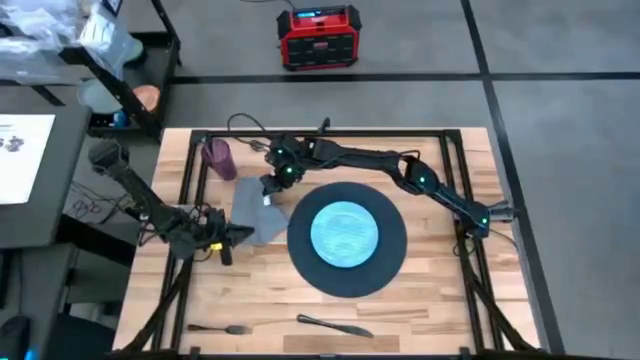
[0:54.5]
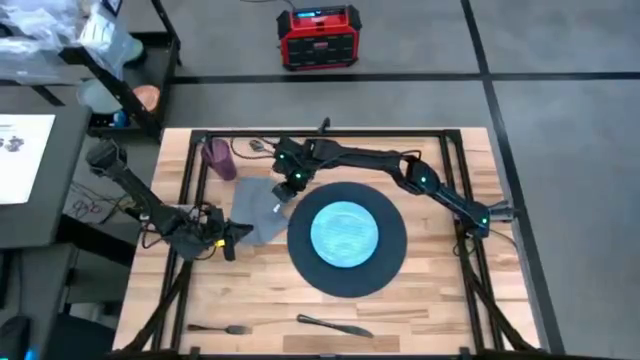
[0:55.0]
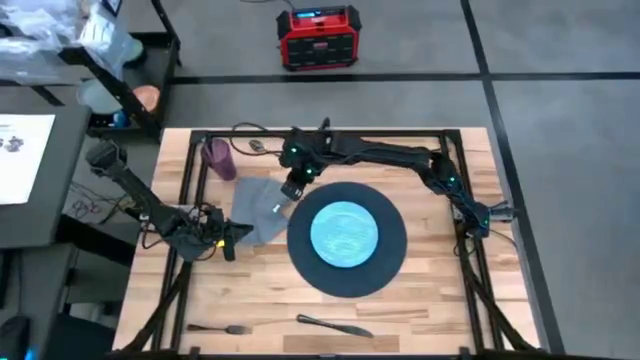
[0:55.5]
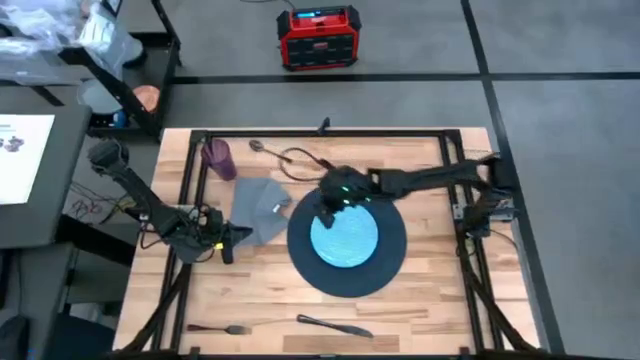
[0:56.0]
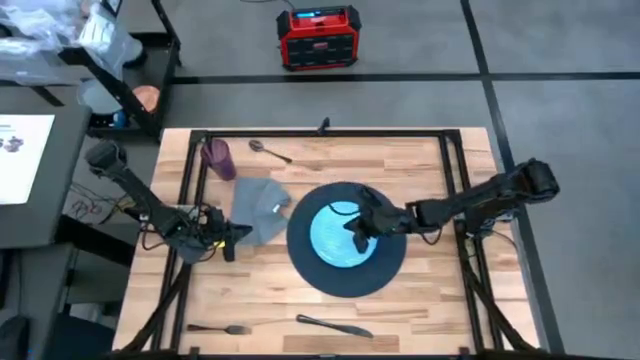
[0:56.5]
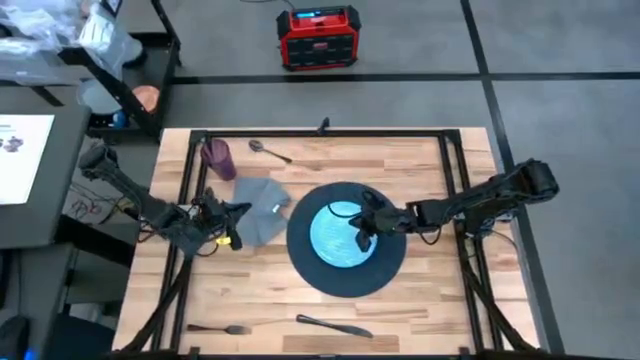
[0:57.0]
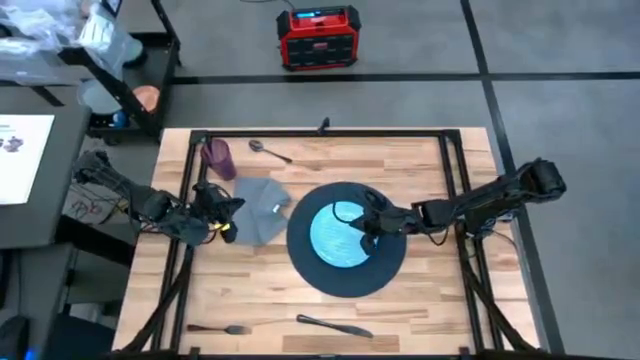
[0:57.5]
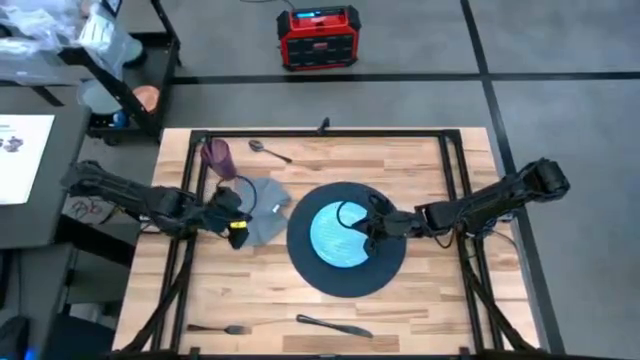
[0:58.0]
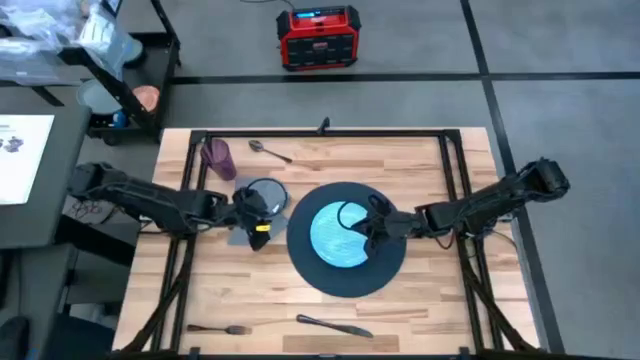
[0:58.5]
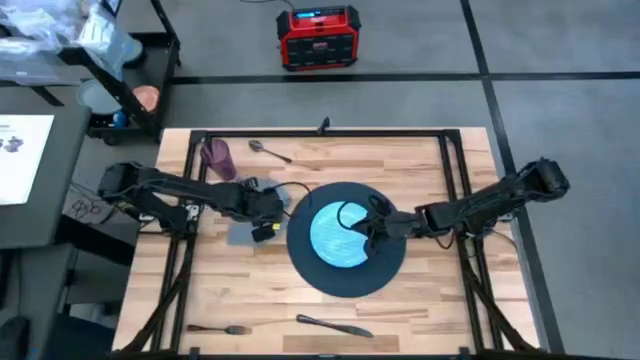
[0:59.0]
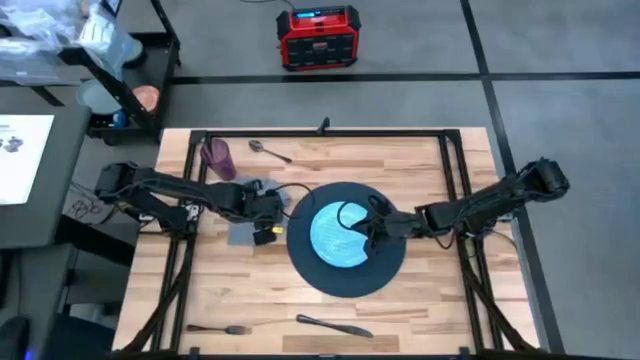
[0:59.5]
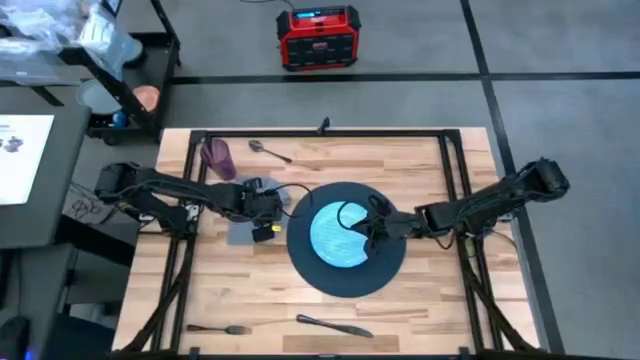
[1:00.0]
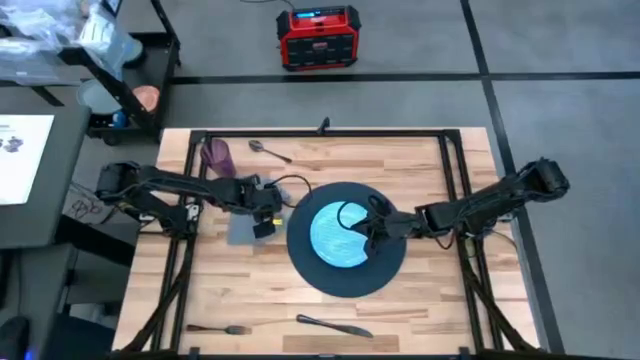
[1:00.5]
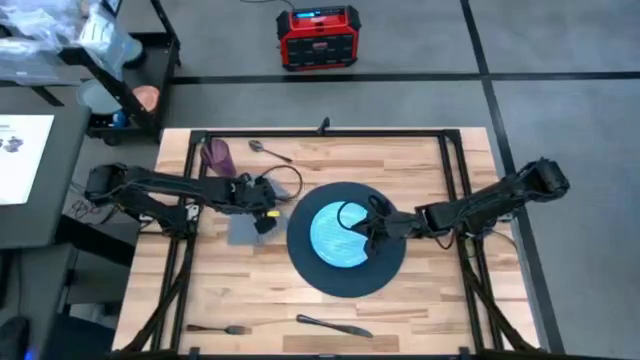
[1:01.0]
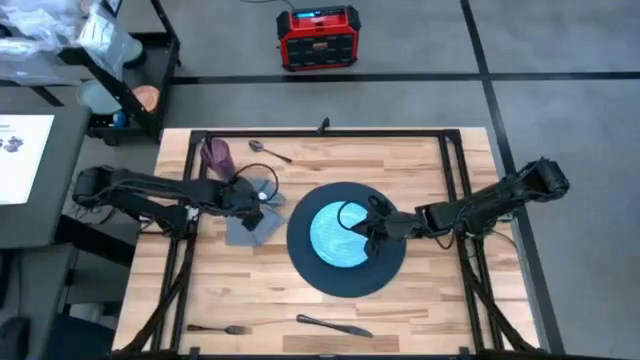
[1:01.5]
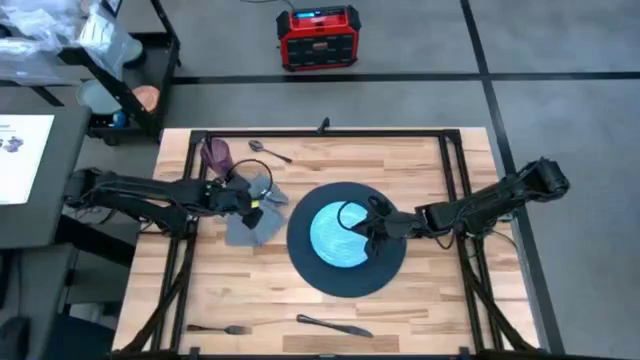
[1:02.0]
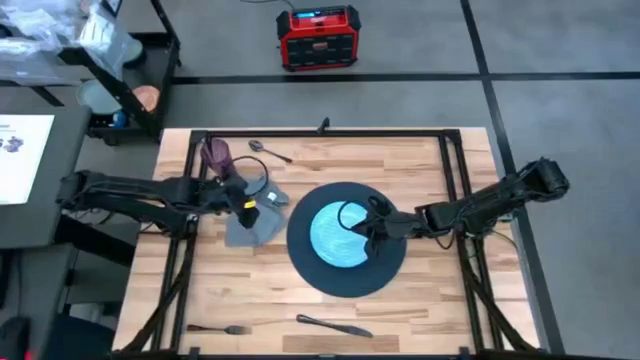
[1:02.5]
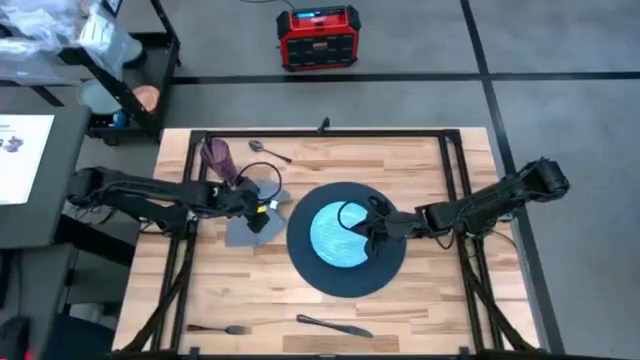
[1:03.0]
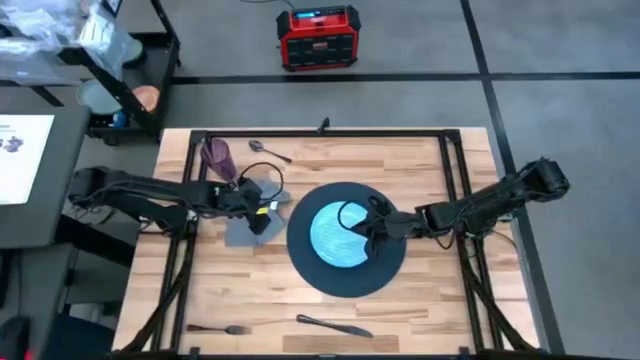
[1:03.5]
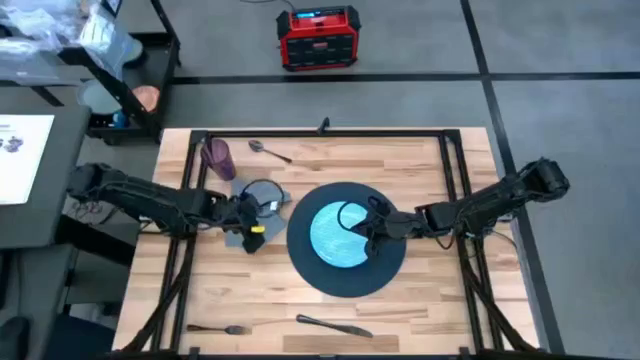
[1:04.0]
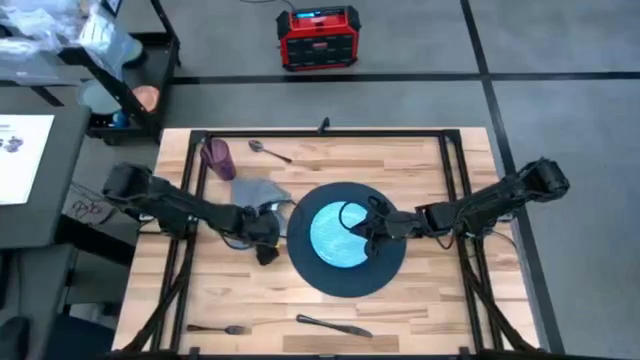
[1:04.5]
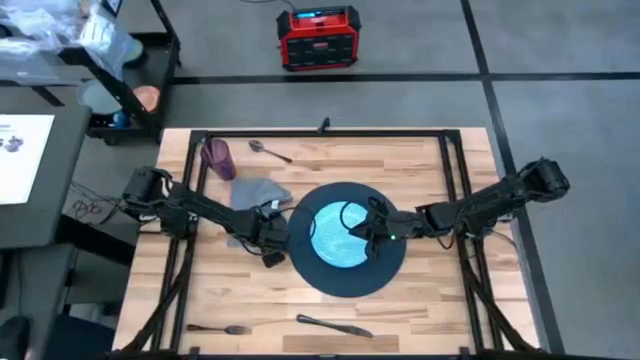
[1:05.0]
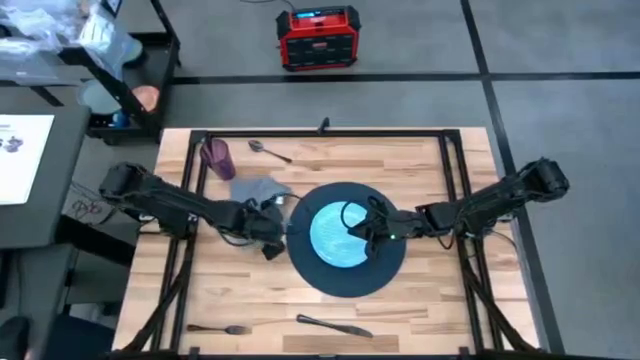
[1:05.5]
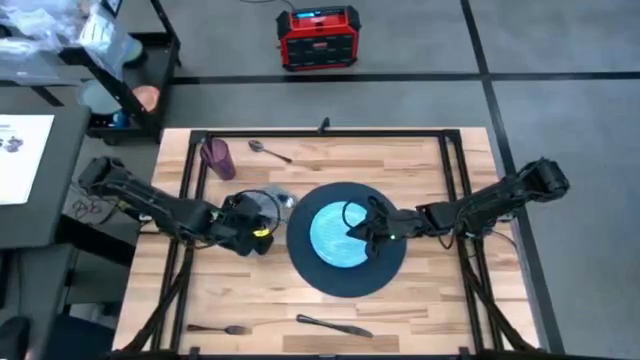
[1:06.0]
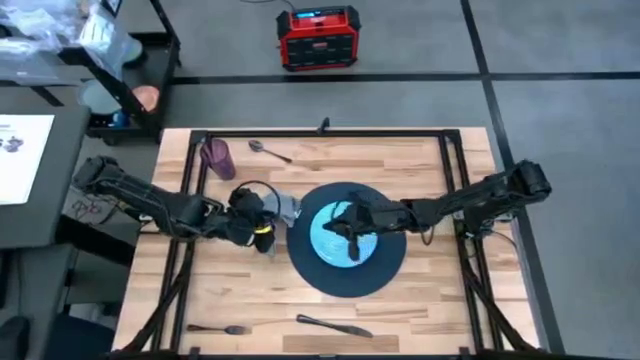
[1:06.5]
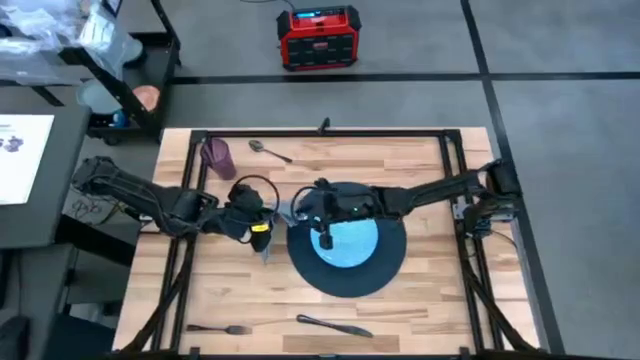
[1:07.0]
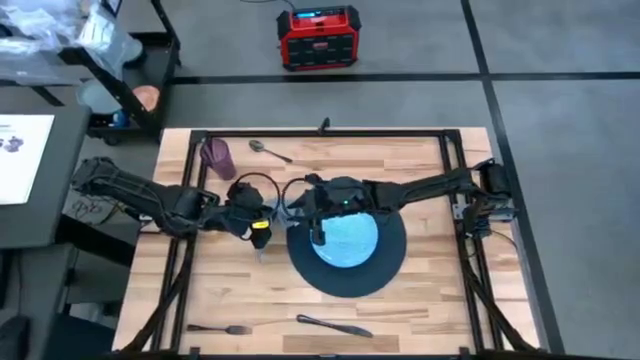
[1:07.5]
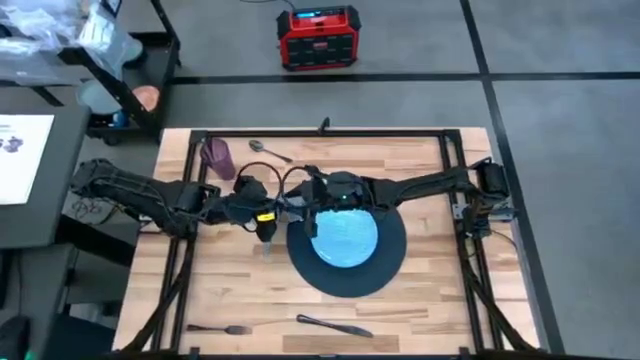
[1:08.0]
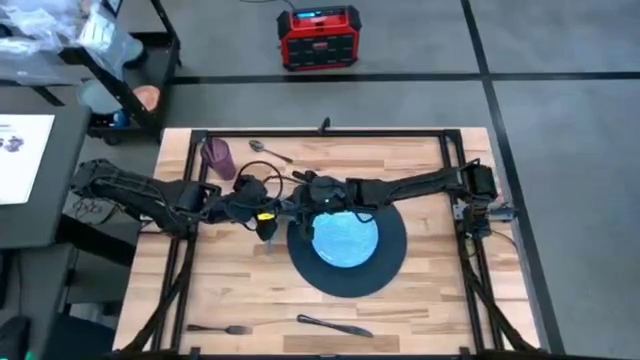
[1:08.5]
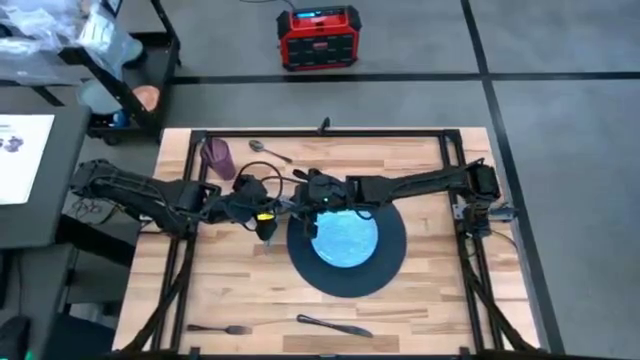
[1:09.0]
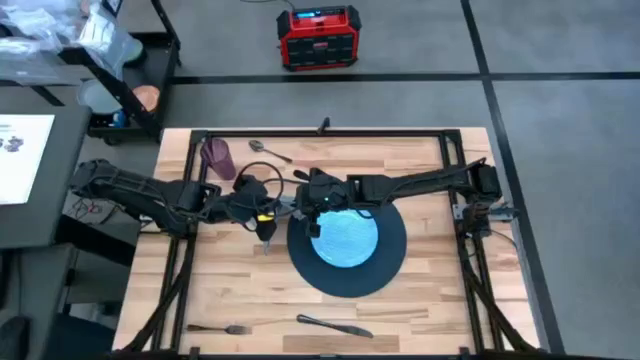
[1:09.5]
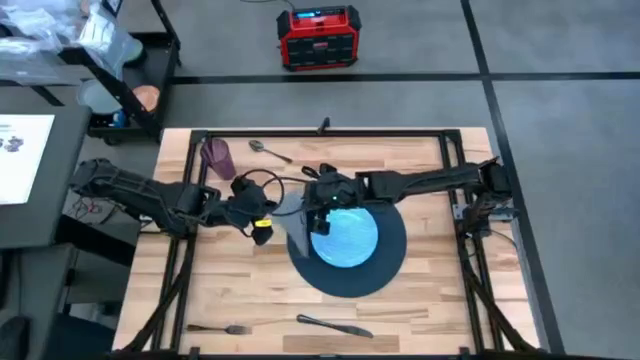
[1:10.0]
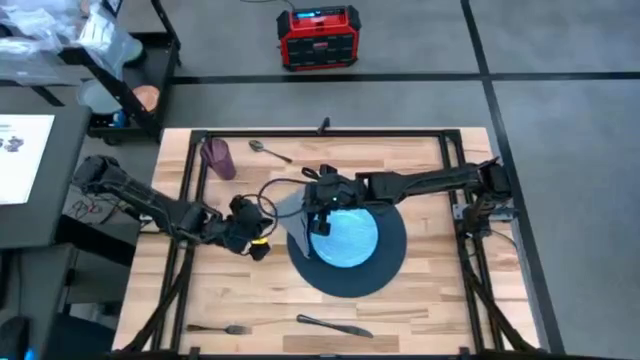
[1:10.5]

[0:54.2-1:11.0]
Task: Set table place
Fold the gray napkin

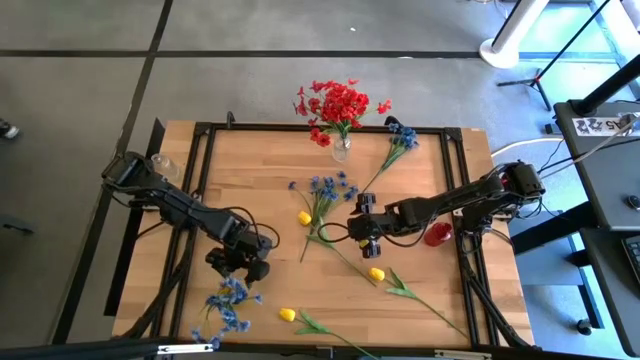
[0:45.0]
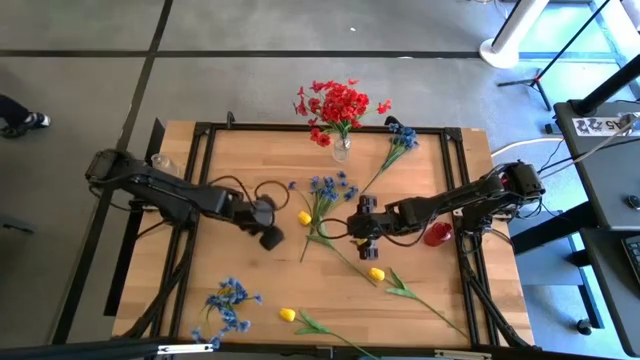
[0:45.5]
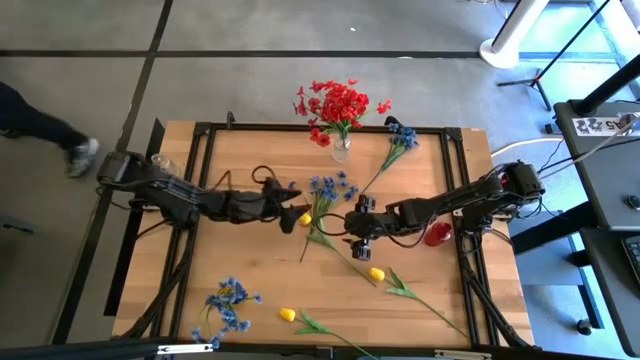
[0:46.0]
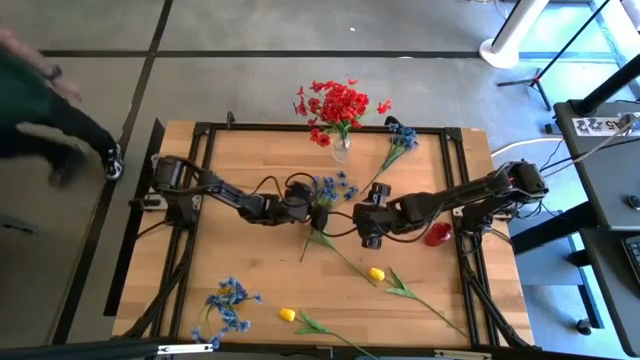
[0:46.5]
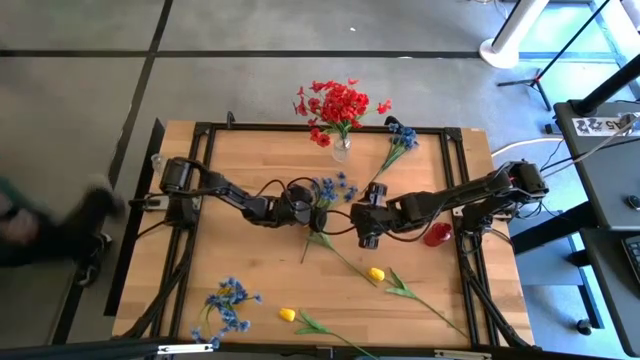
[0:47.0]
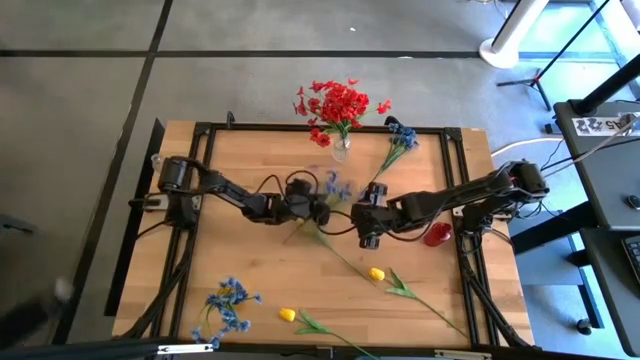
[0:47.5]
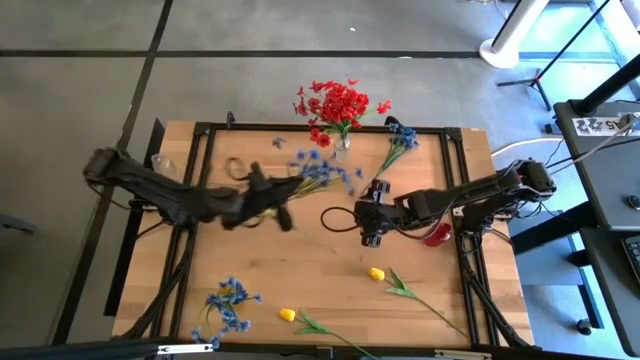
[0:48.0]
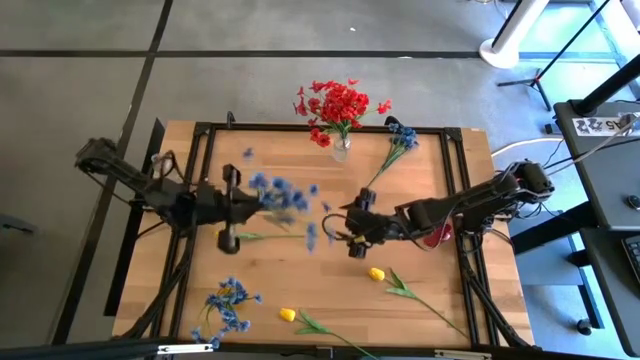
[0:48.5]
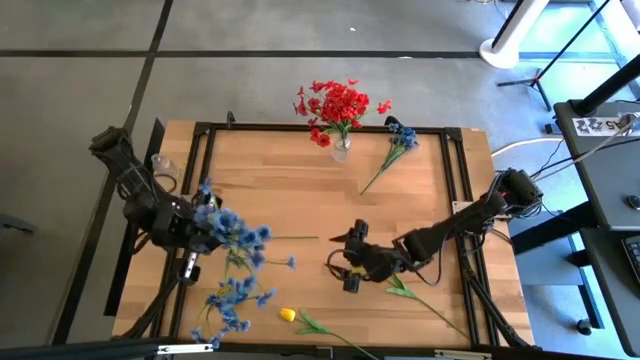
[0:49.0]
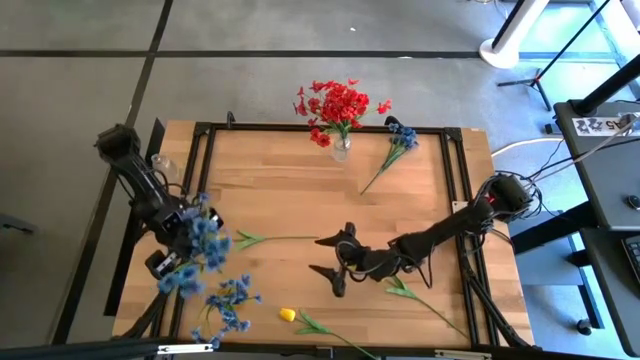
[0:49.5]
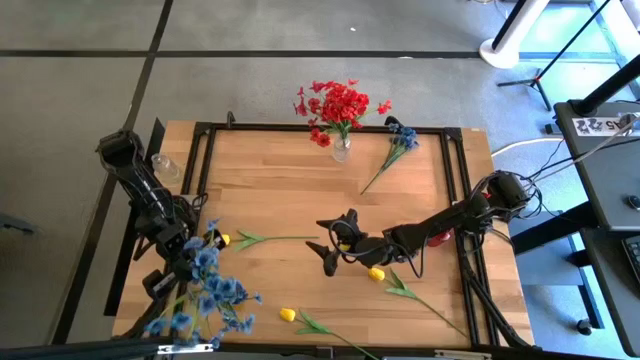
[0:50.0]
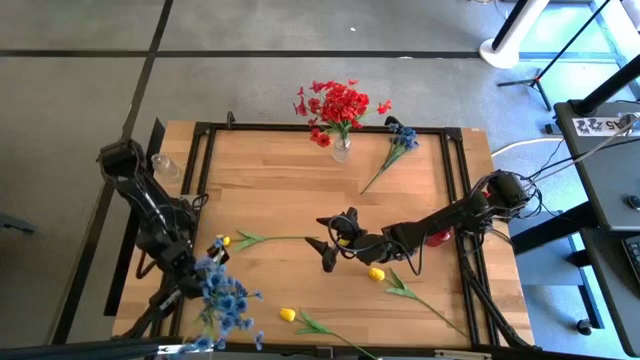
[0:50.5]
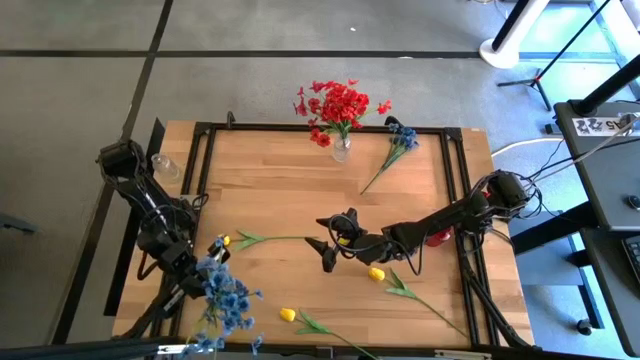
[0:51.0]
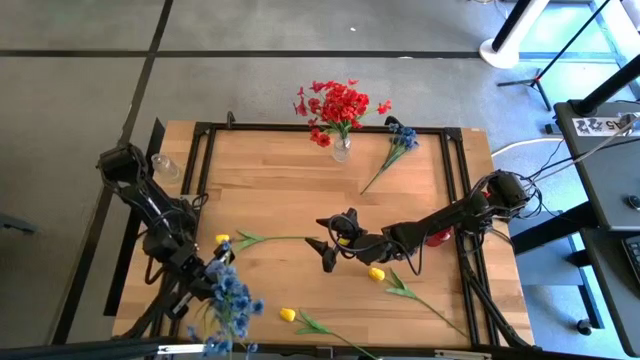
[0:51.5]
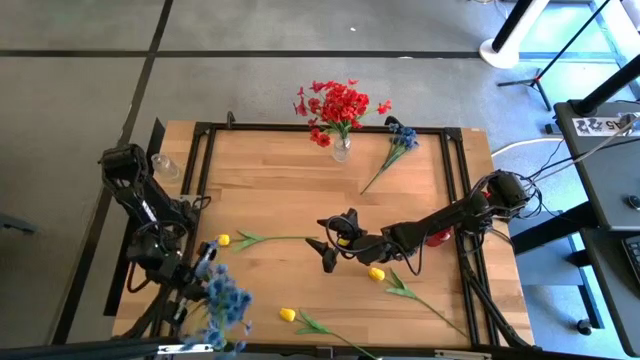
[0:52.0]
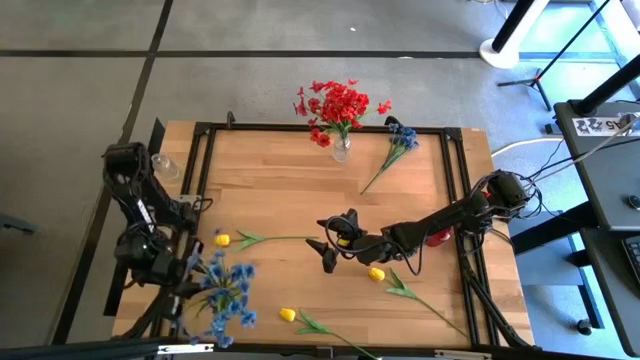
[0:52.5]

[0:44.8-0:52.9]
Task: Sort flowers into vase by color
Put the bottom blue flower into the yellow vase
